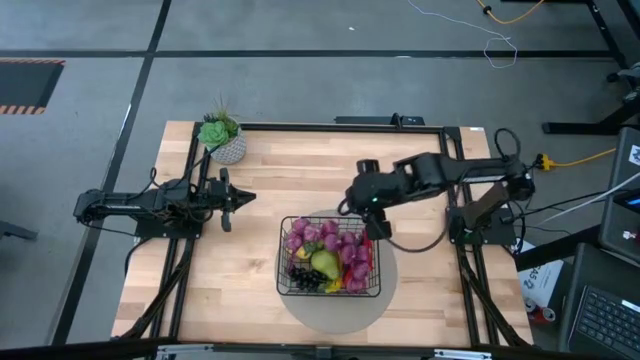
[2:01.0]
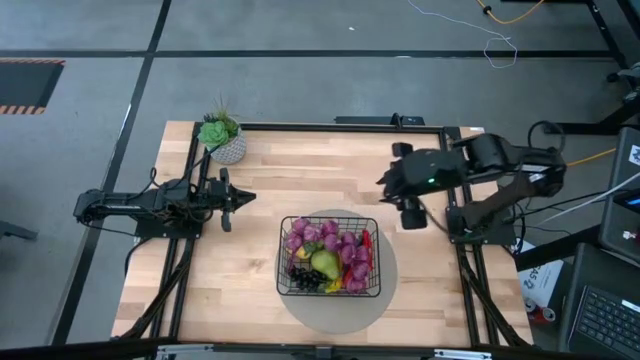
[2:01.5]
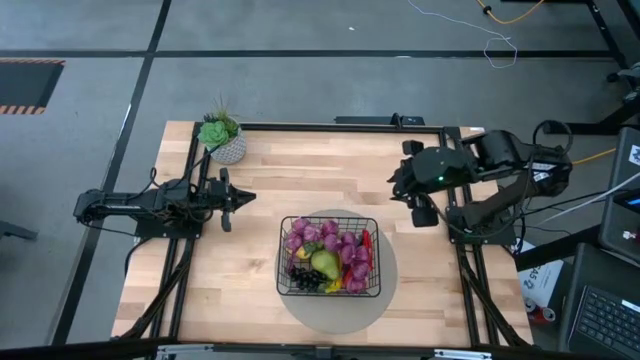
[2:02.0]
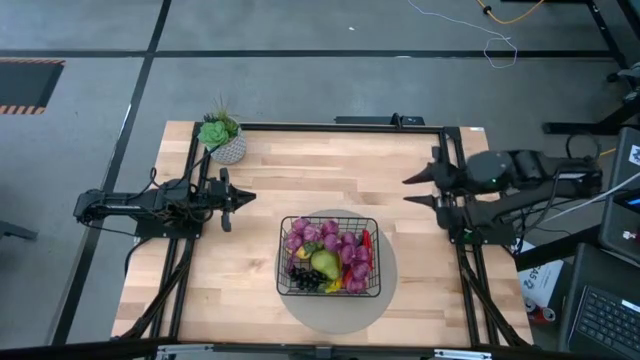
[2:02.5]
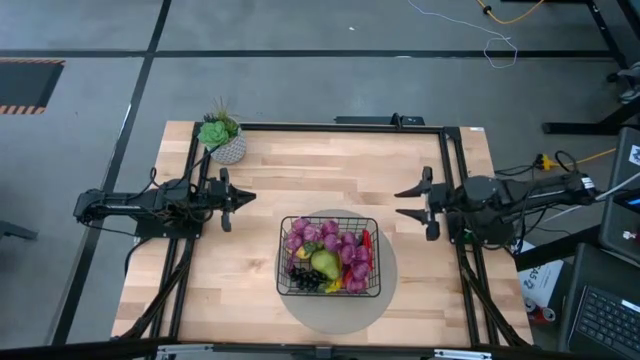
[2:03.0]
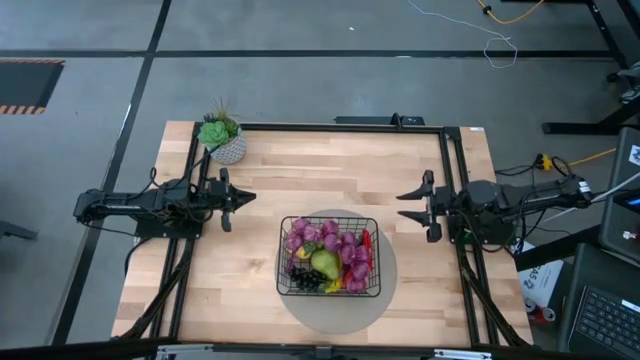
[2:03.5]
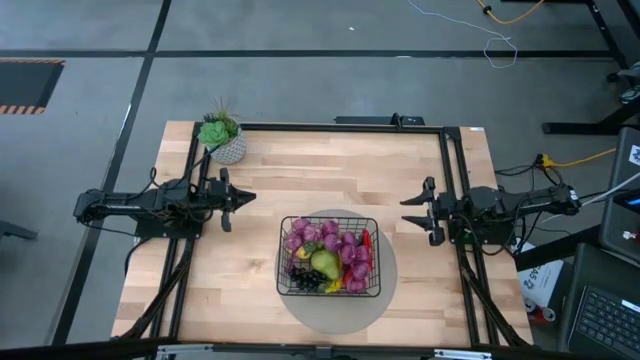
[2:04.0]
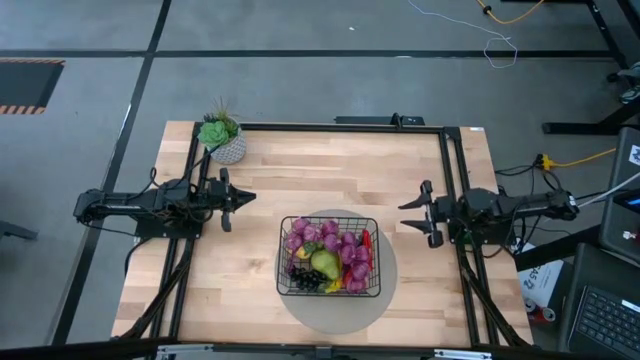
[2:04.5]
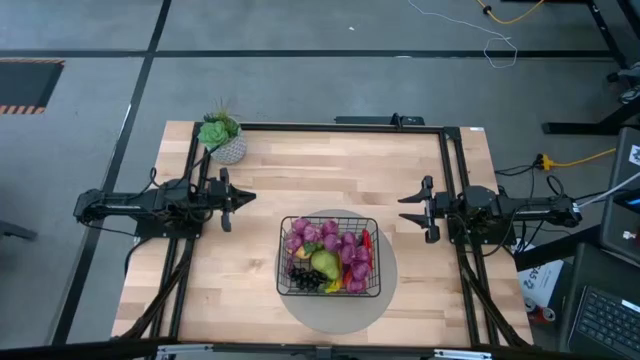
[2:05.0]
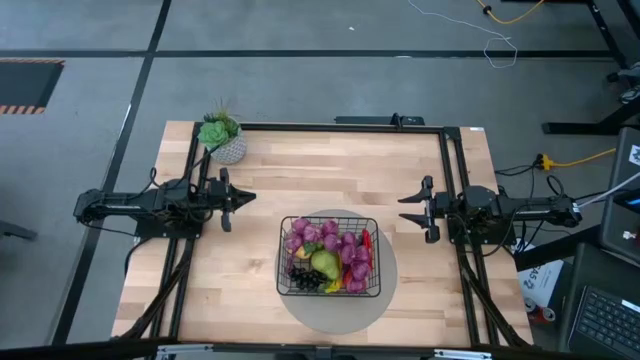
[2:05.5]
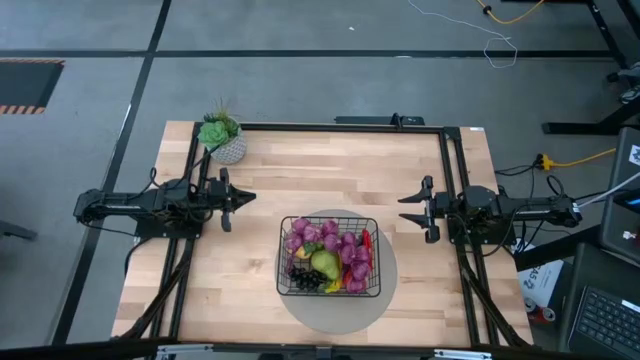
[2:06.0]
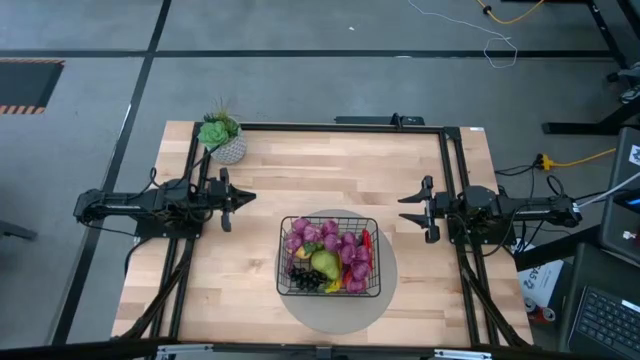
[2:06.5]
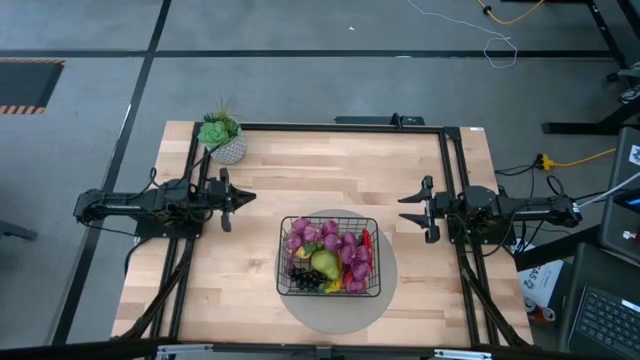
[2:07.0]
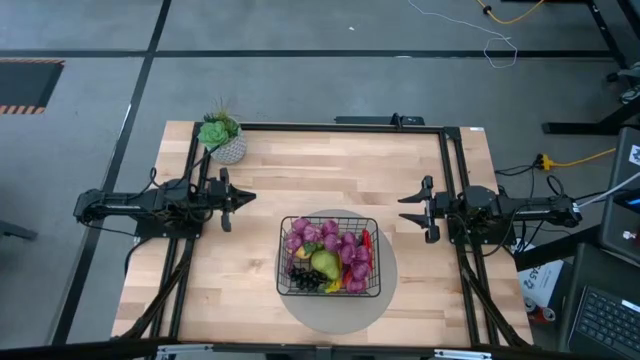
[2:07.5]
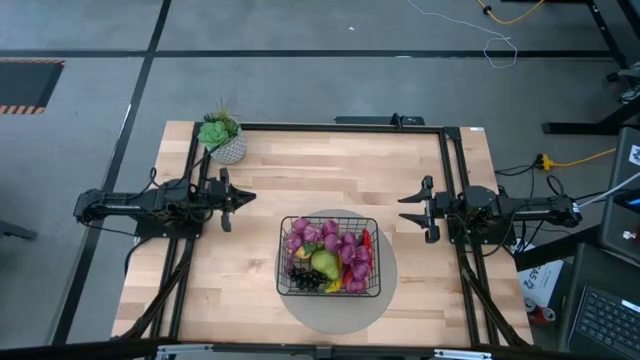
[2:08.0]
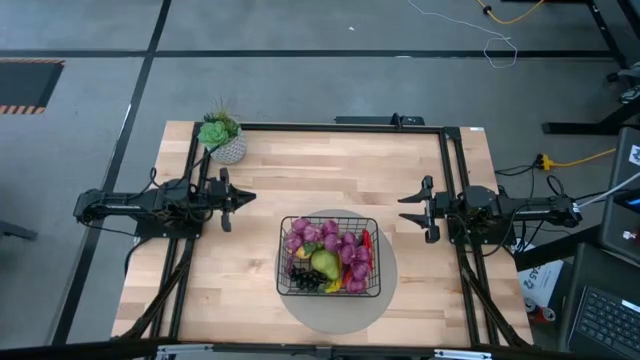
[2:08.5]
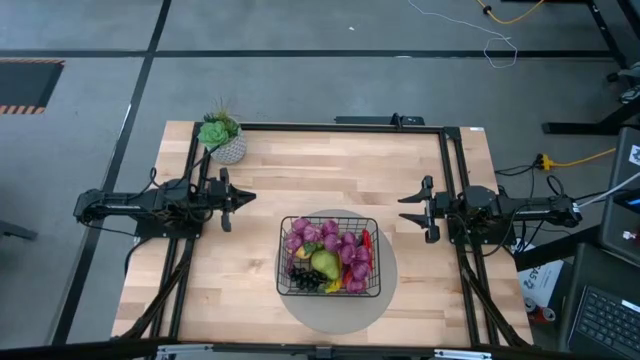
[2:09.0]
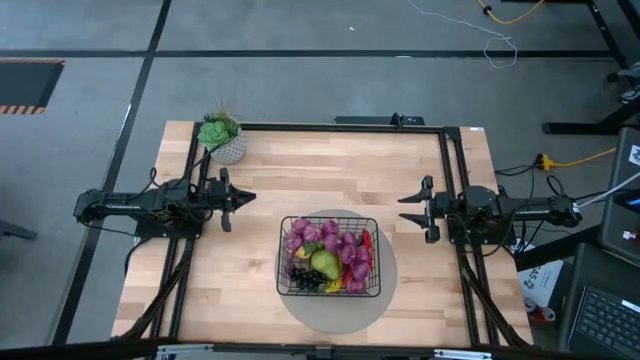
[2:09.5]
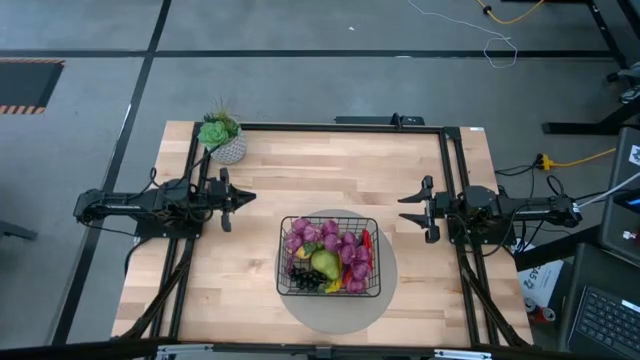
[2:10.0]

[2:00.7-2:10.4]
Task: Build produce basket
Return to Home Position

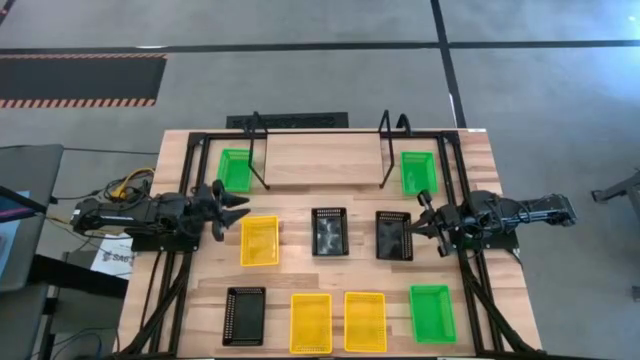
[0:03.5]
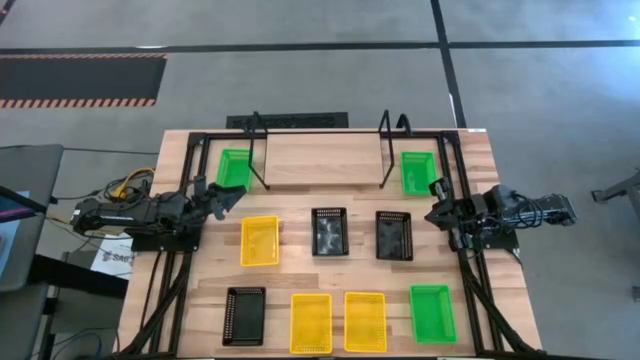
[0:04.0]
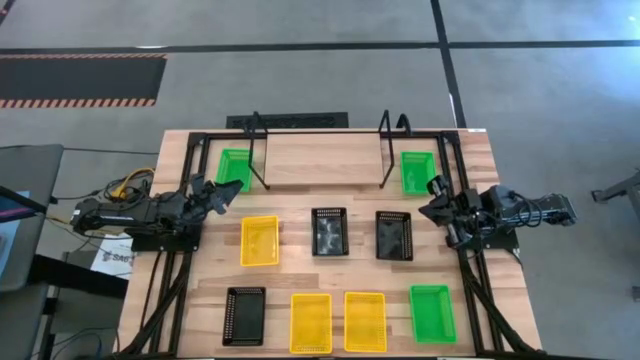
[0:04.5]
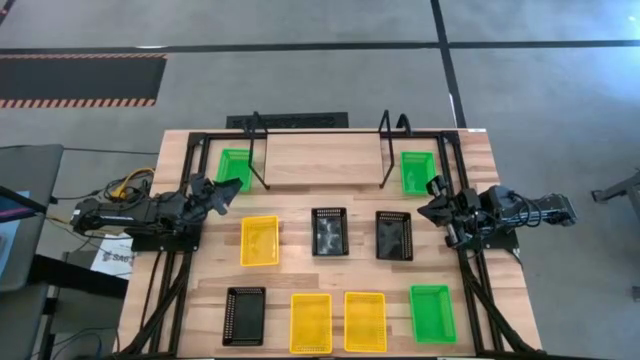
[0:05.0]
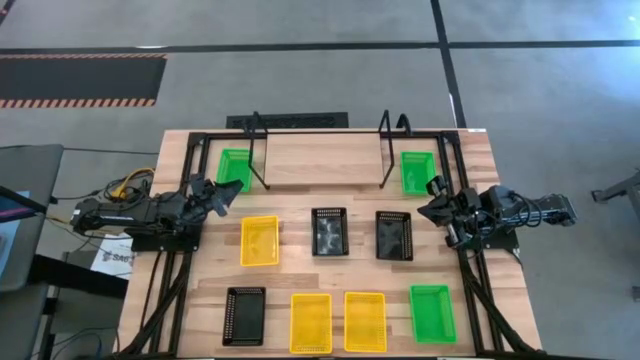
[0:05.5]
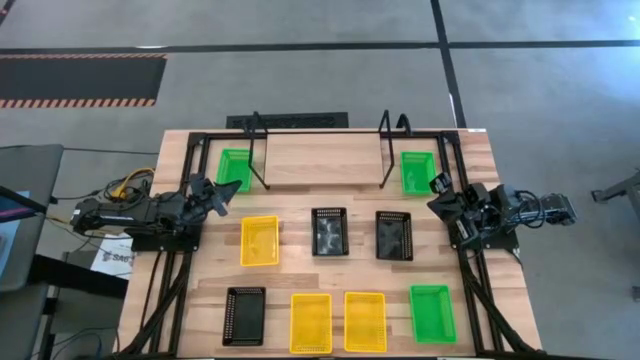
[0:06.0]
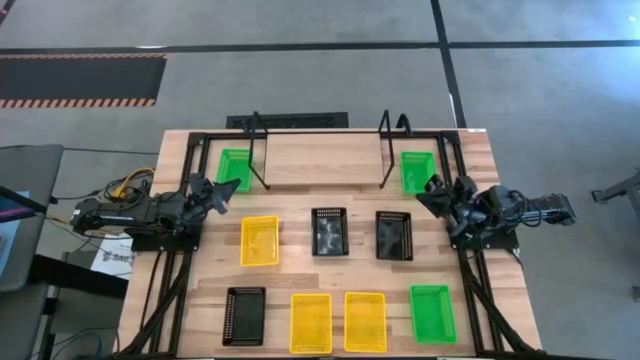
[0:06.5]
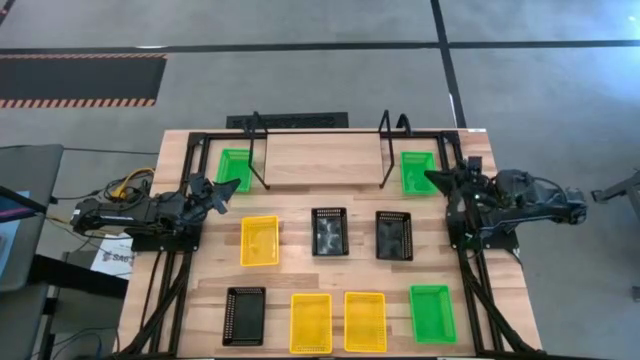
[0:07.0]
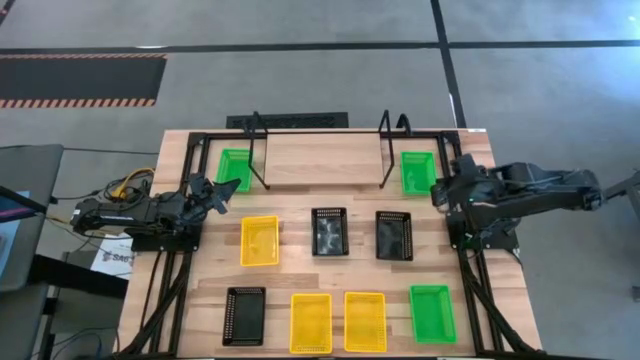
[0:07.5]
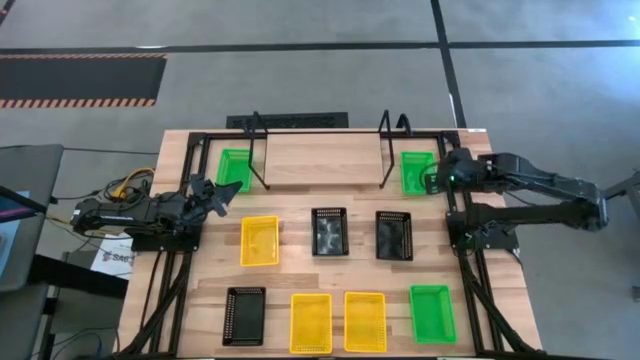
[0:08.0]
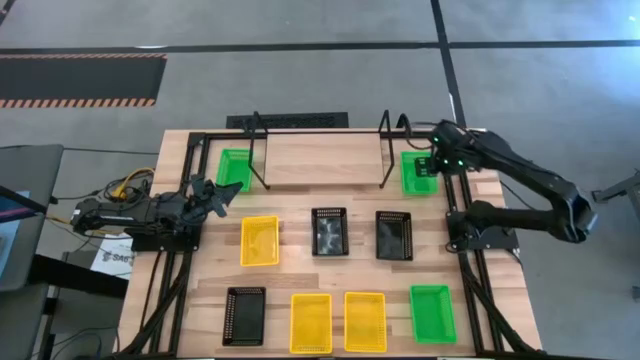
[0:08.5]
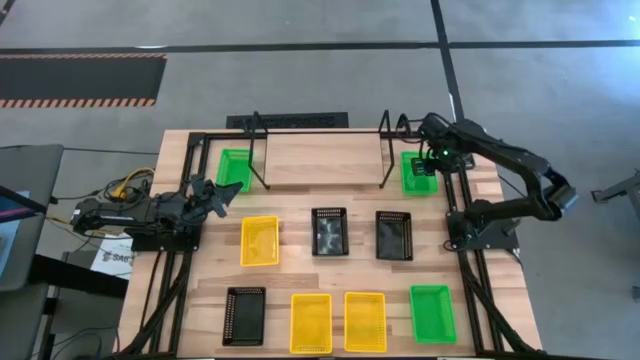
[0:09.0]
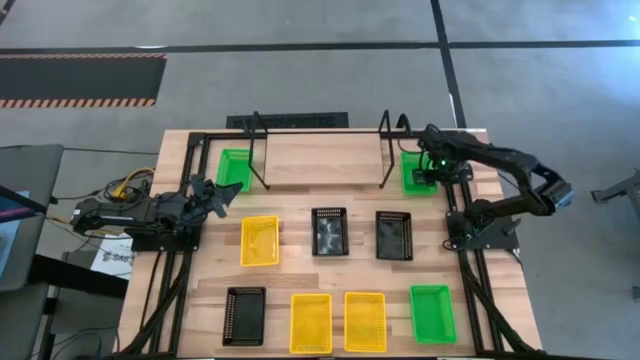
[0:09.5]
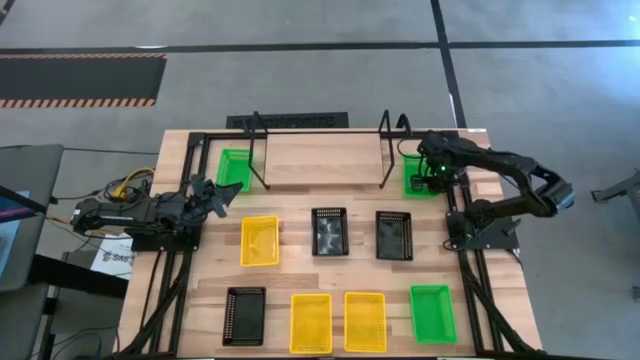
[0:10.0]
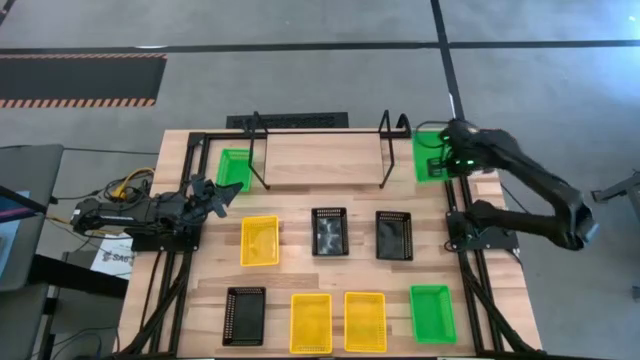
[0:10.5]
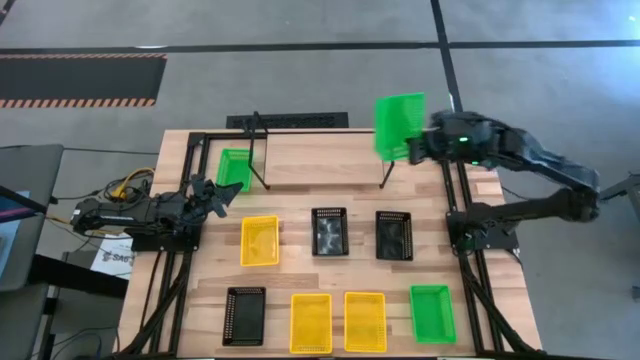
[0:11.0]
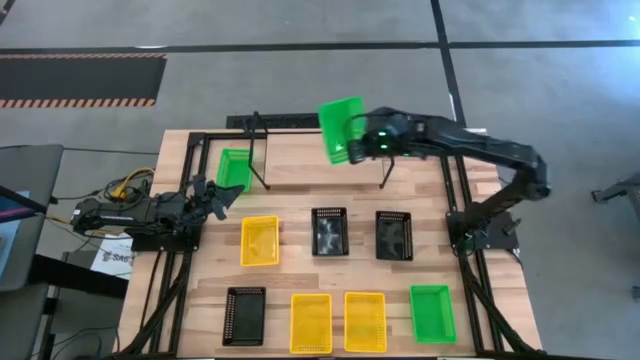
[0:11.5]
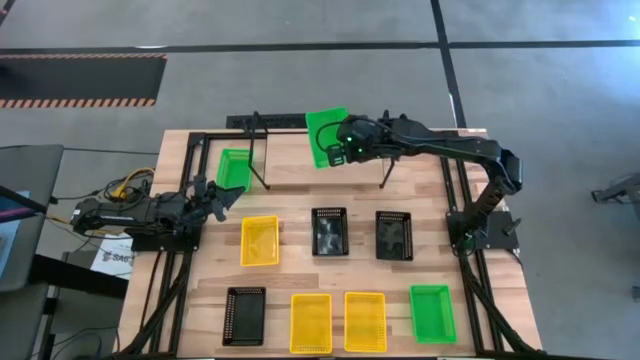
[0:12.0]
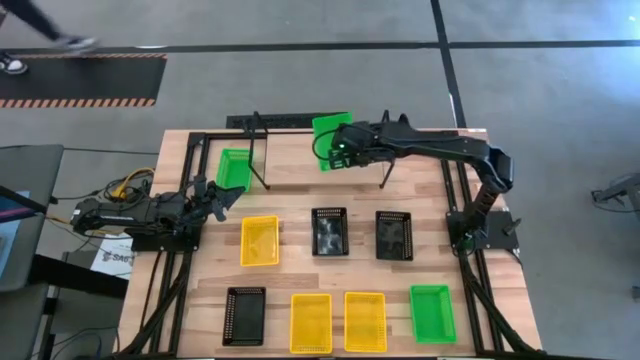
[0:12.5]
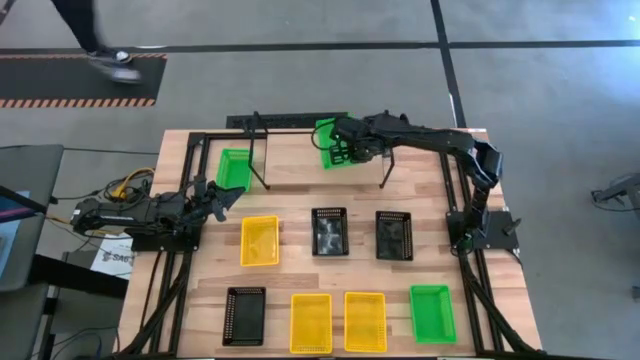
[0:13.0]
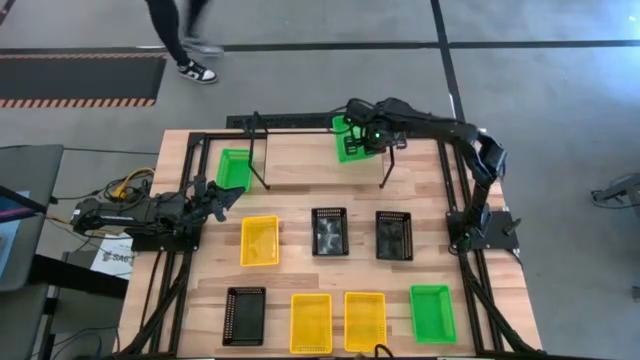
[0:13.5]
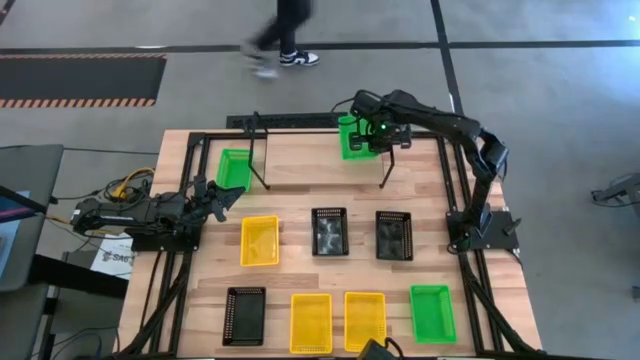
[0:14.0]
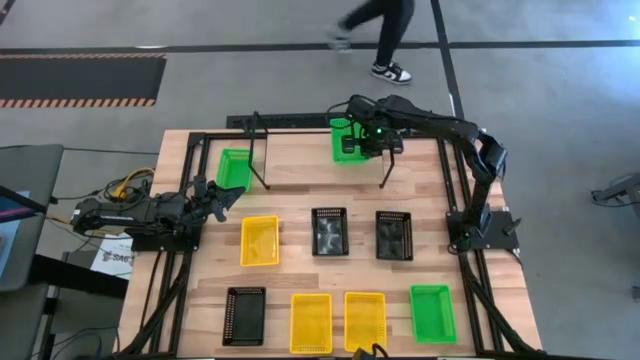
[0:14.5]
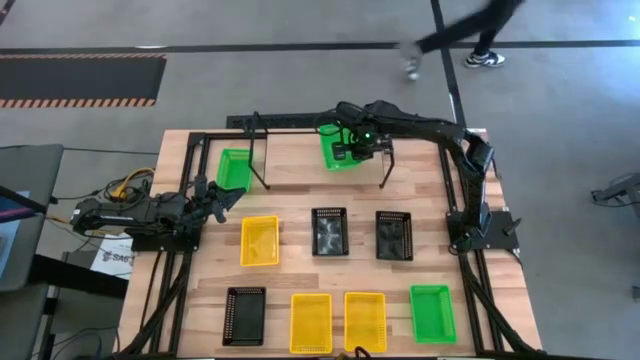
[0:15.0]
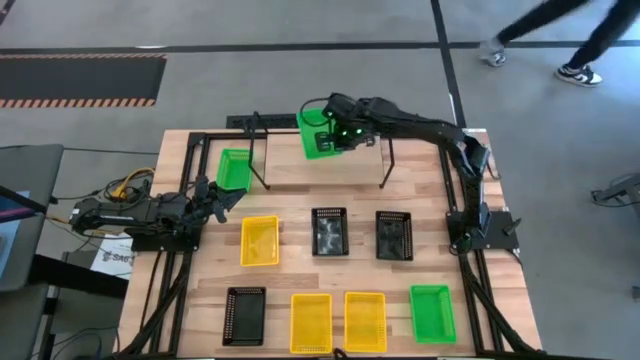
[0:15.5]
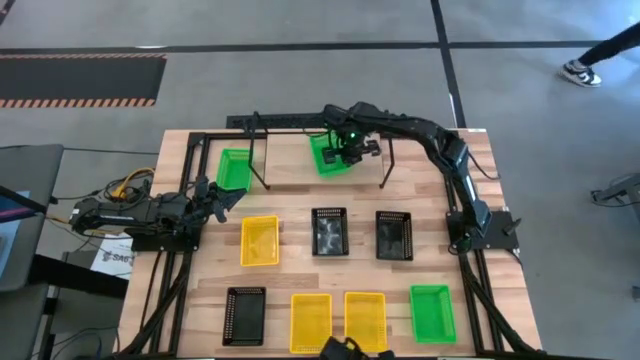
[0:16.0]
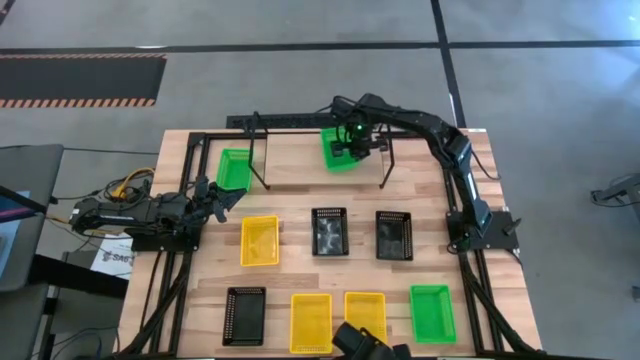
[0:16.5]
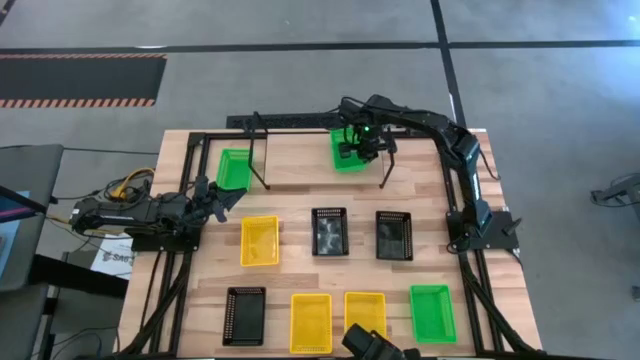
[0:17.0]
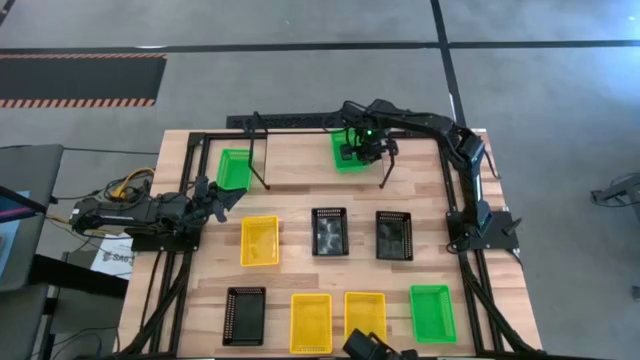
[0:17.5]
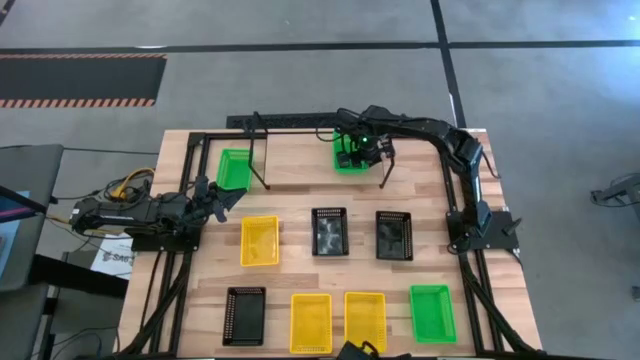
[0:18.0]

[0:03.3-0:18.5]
Task: Stack baskets on shelf by color
Put the top right green bin on the shelf
